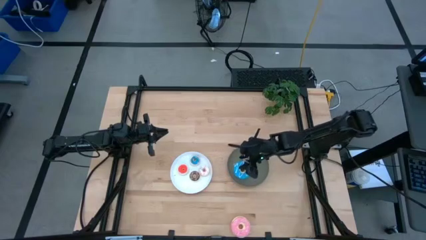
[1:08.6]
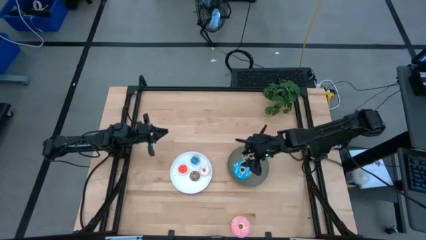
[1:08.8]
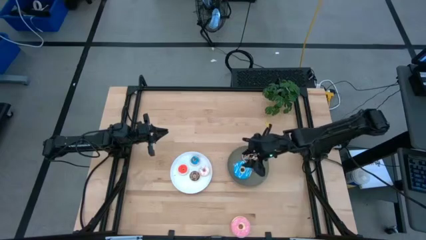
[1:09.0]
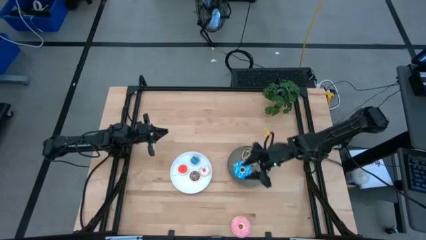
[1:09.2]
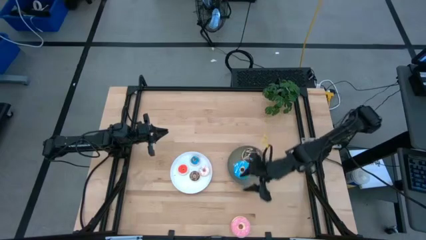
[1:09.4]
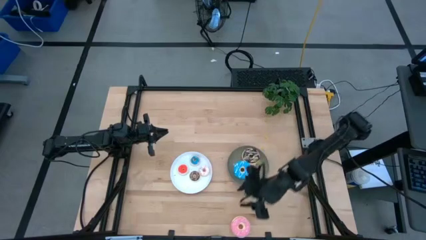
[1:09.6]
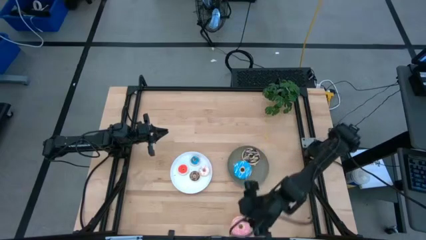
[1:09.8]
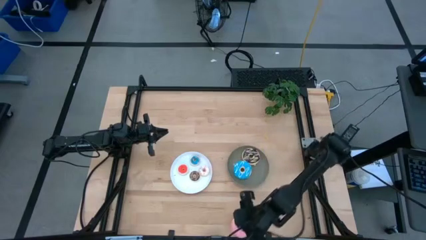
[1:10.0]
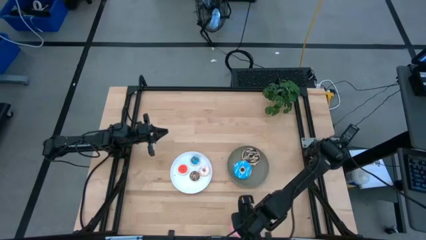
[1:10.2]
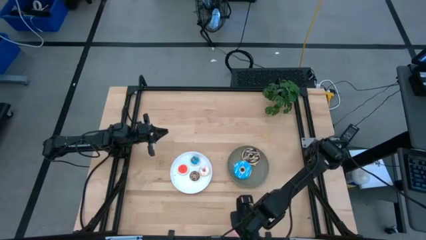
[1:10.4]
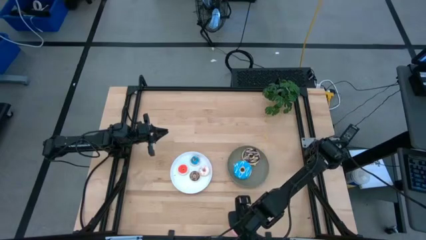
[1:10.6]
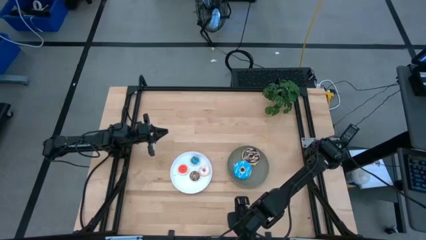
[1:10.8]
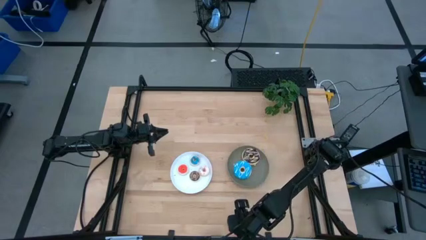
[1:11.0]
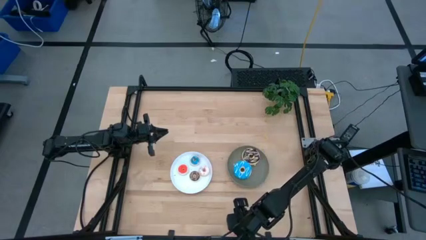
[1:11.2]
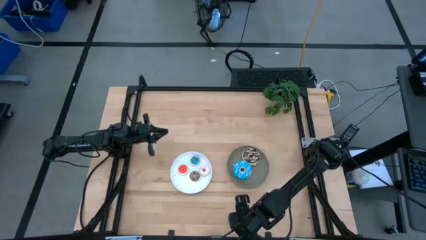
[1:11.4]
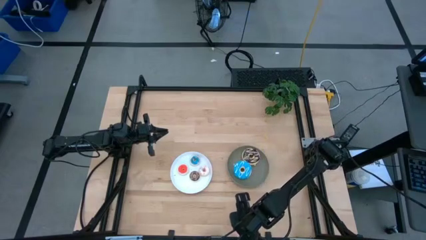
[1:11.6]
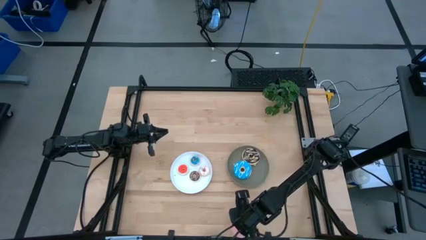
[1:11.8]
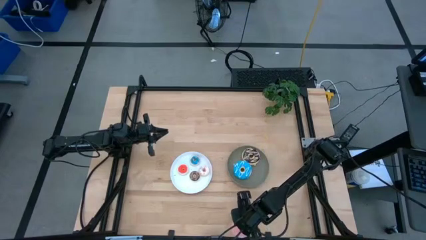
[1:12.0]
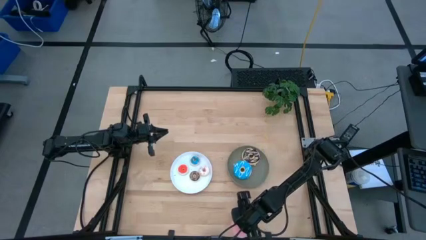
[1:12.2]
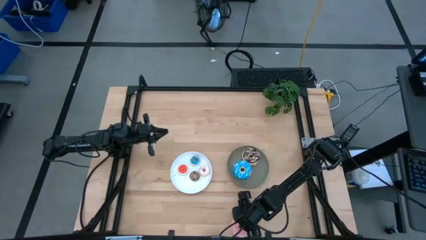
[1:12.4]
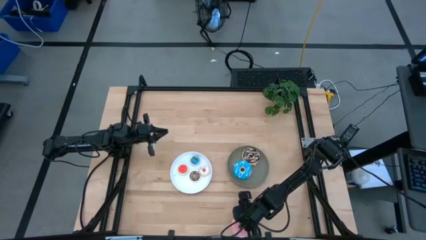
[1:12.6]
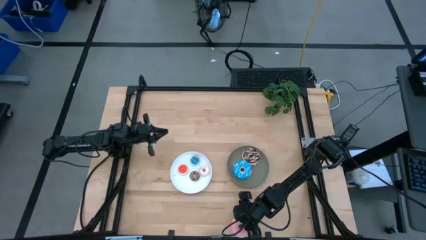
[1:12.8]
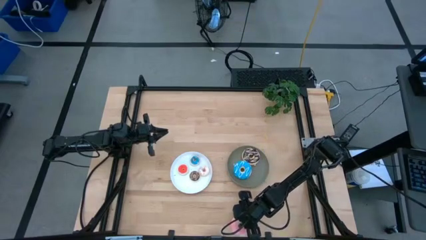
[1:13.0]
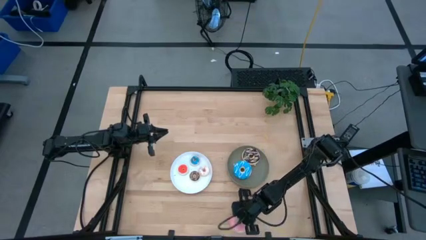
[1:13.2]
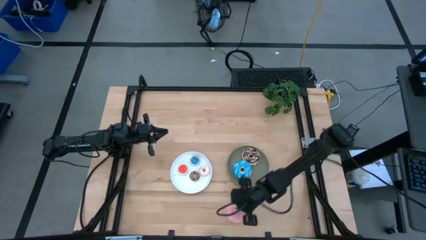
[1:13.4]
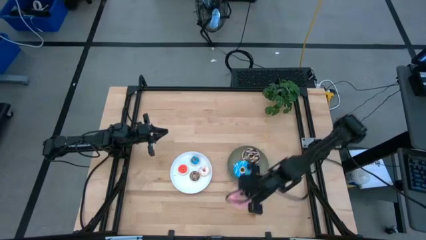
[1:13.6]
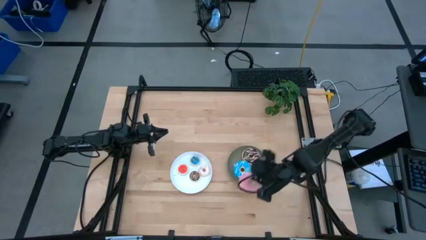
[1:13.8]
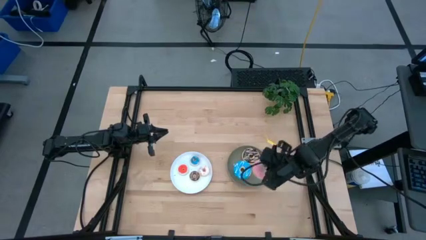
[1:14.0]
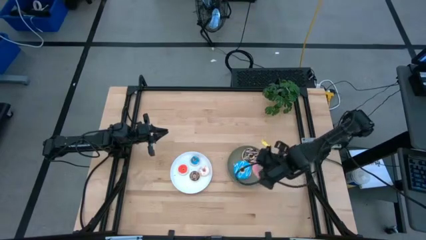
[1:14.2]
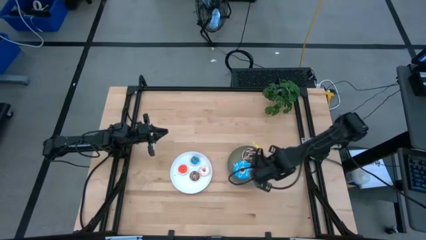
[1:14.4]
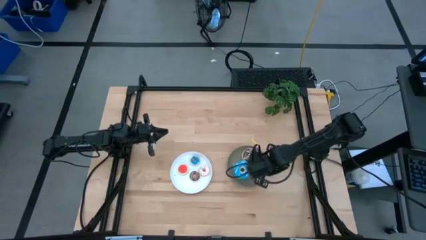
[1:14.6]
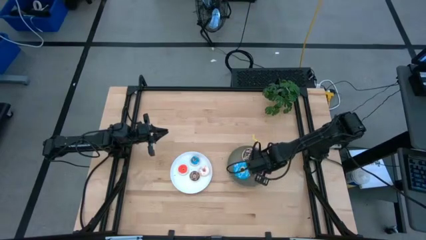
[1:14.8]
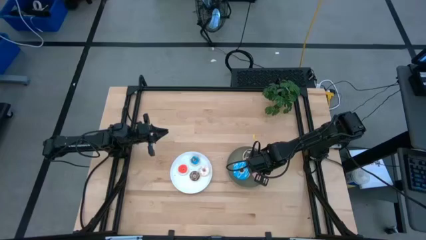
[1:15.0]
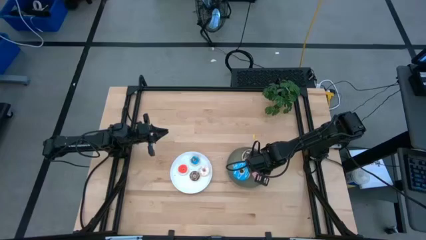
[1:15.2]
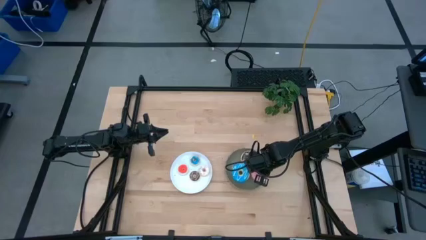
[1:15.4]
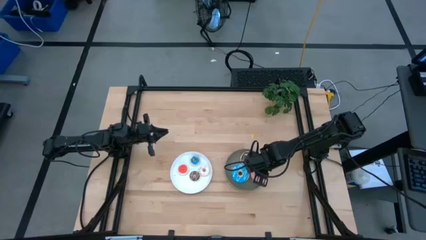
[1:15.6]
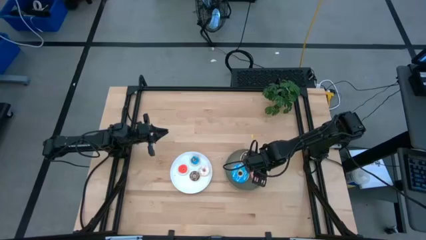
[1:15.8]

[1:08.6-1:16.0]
Task: Pick & Place donuts
Put the pink doughnut on the gray plate

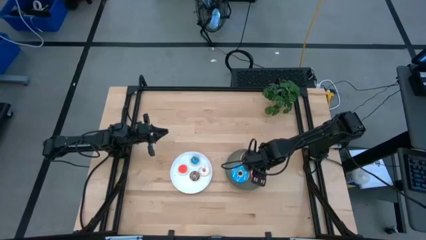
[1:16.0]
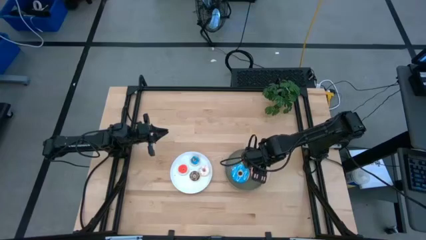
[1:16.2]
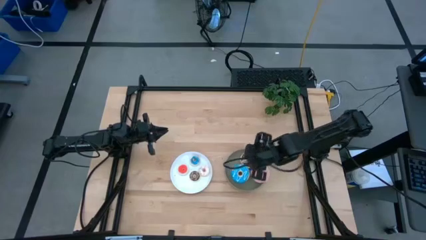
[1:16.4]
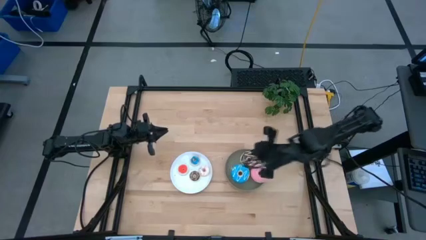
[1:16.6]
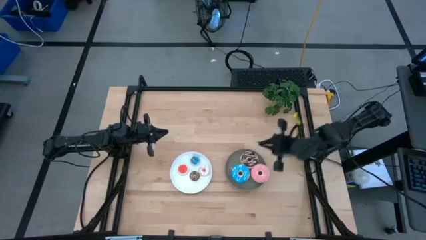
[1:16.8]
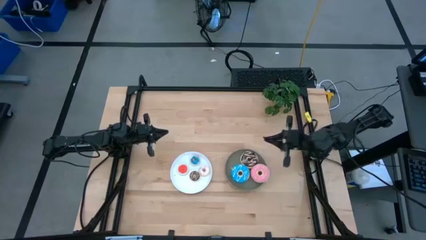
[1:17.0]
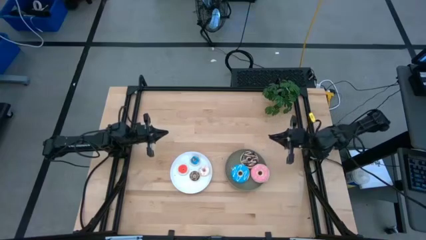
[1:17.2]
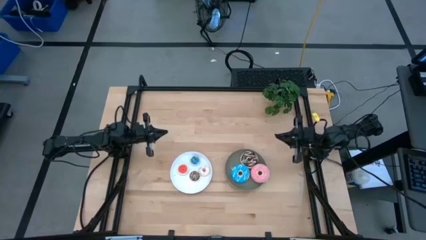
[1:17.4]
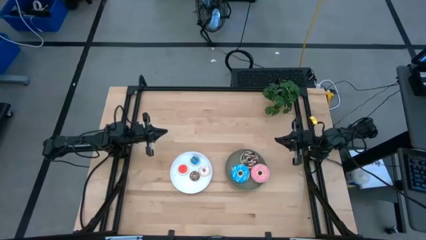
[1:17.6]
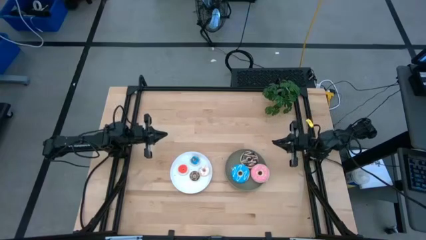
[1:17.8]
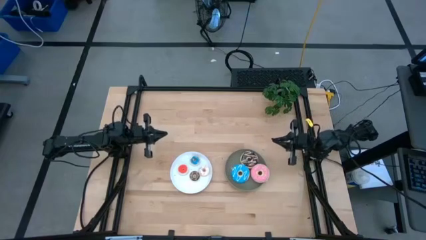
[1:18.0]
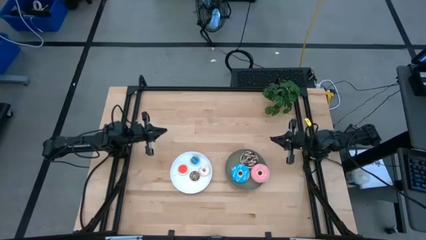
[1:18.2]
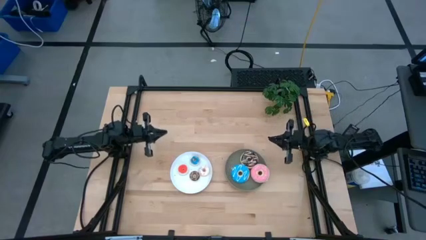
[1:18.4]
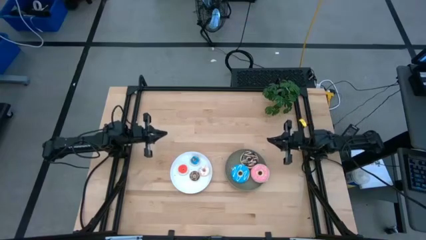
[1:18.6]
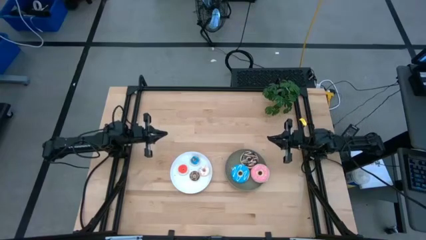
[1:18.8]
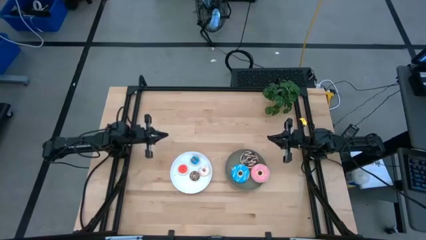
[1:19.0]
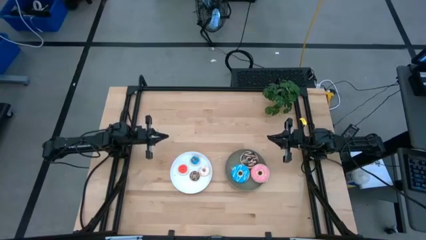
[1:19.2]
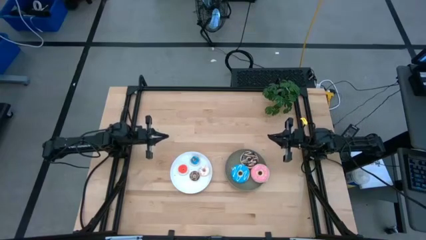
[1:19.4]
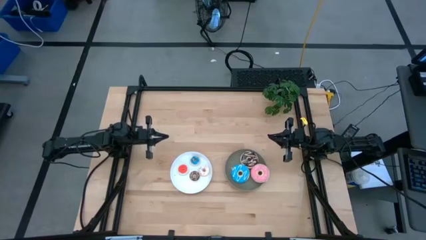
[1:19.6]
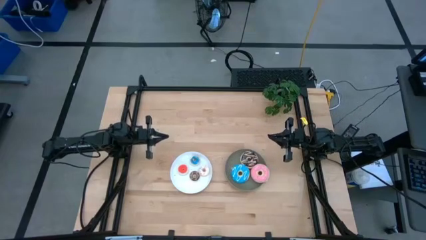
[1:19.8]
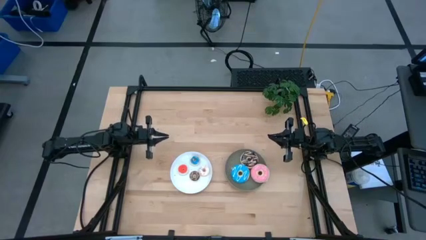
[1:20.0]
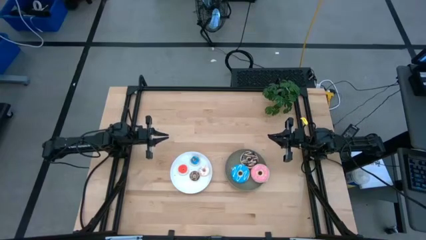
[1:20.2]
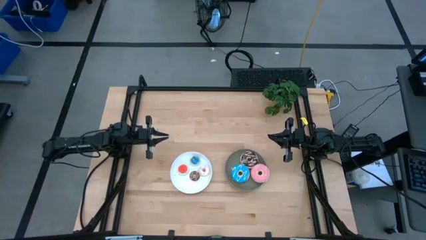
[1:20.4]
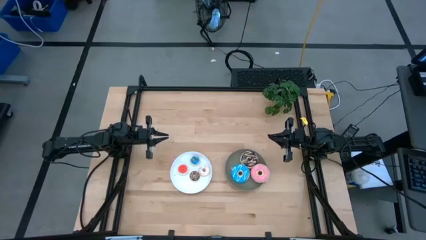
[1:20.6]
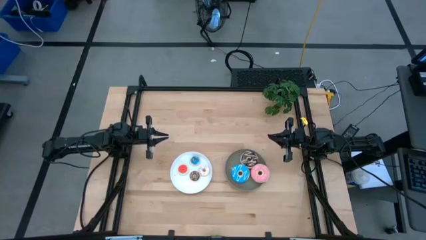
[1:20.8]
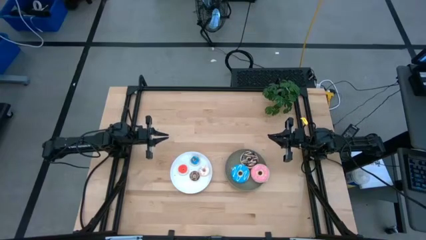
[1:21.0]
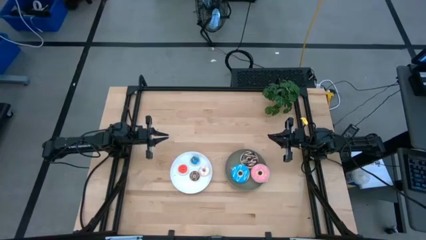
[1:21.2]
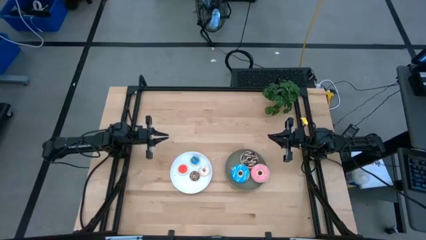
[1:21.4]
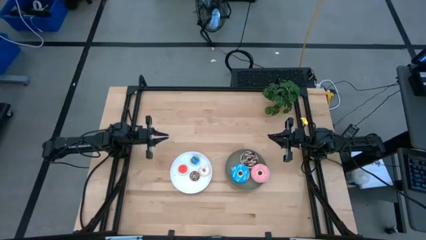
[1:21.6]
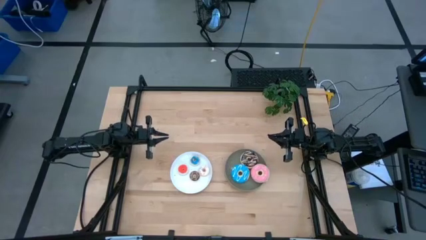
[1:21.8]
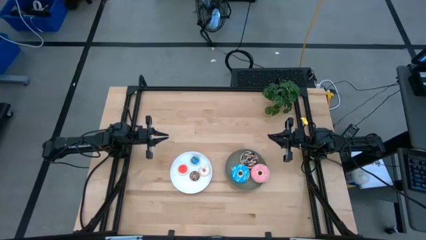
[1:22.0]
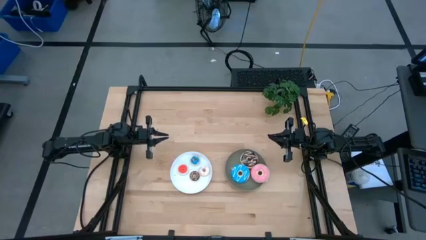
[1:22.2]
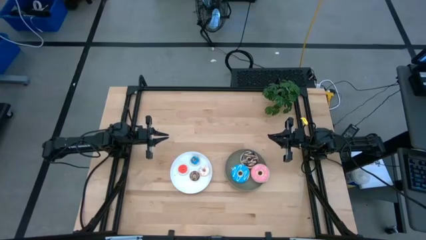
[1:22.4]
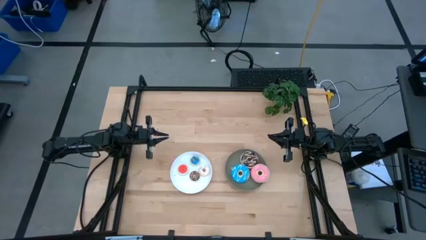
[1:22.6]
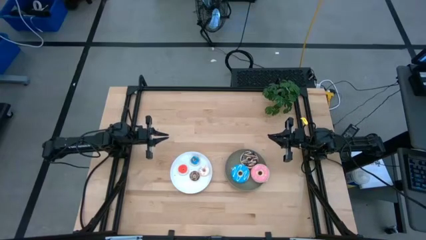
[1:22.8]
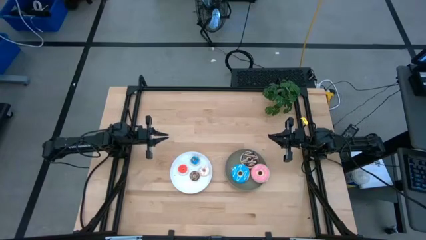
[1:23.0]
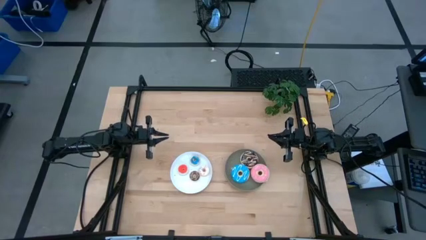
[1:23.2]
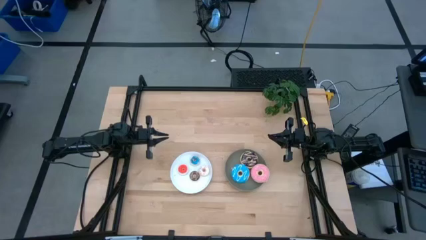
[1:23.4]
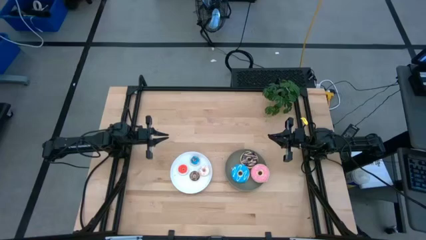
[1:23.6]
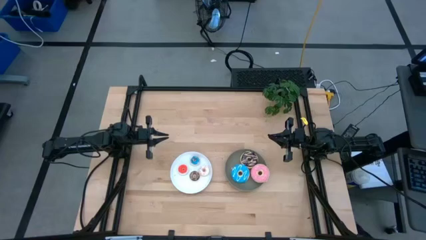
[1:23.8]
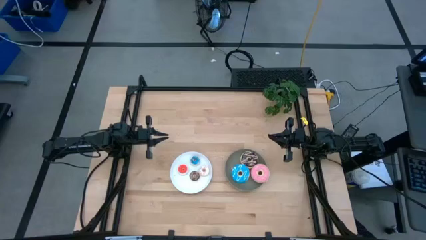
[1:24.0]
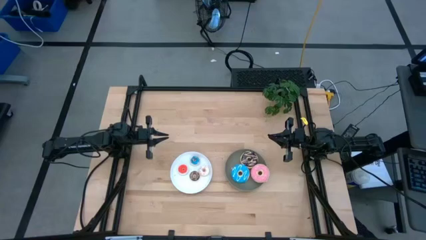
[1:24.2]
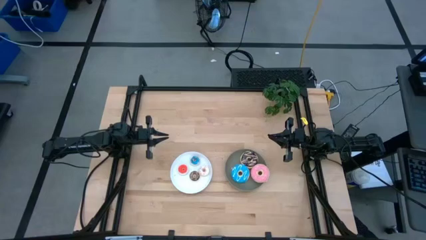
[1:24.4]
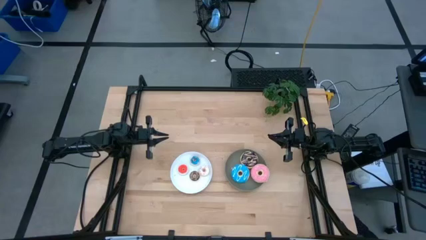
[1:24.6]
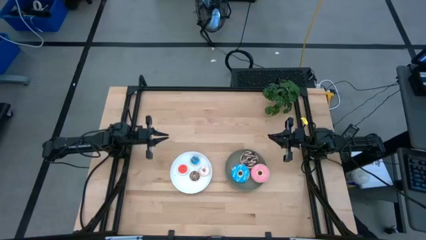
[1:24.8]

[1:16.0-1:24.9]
Return to Home Position
